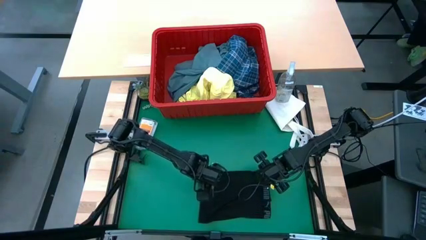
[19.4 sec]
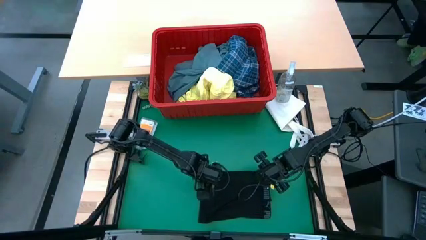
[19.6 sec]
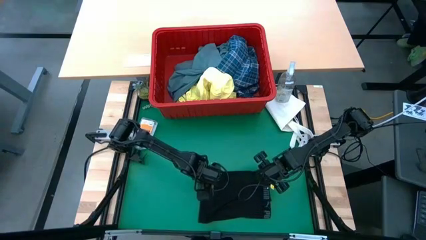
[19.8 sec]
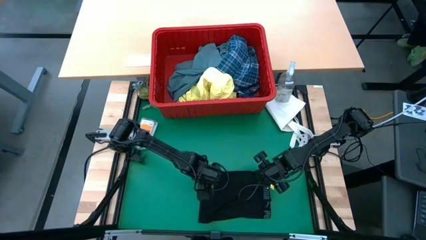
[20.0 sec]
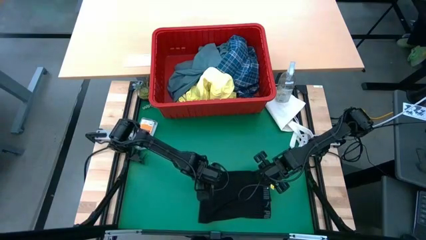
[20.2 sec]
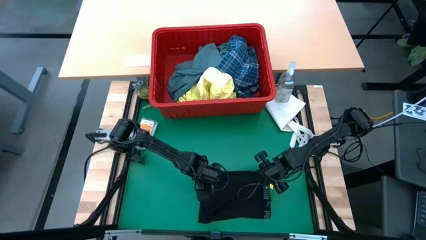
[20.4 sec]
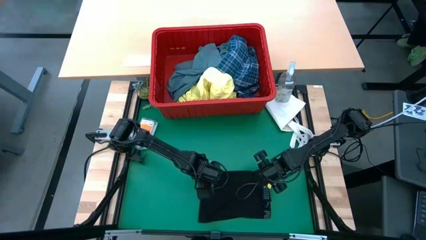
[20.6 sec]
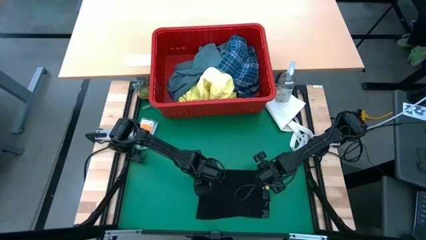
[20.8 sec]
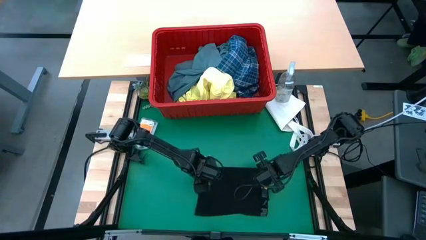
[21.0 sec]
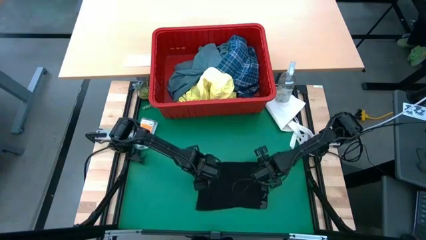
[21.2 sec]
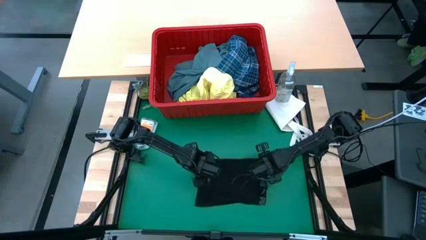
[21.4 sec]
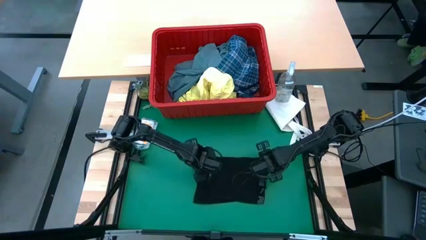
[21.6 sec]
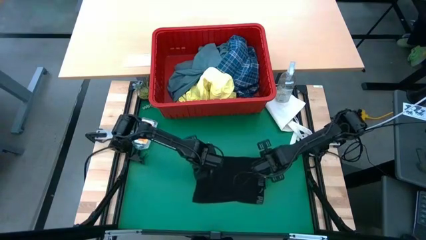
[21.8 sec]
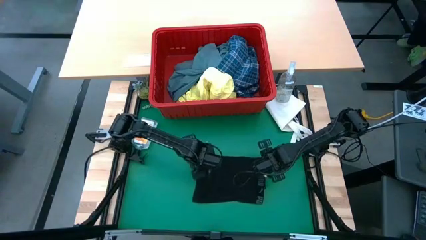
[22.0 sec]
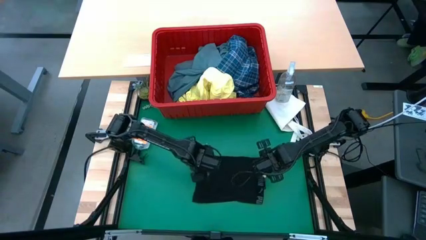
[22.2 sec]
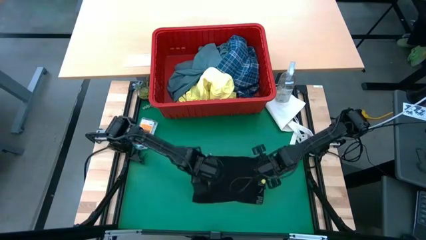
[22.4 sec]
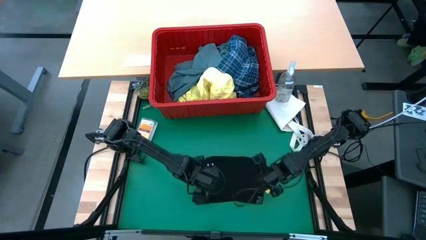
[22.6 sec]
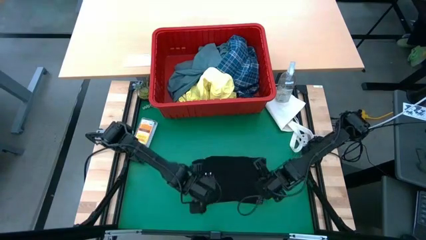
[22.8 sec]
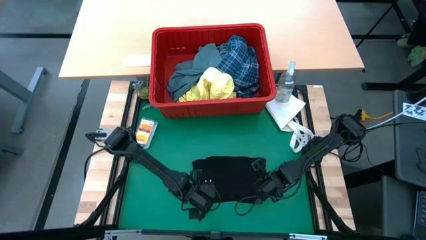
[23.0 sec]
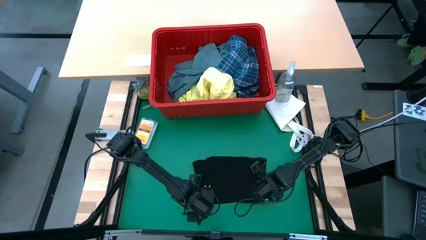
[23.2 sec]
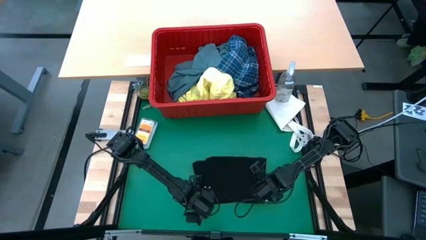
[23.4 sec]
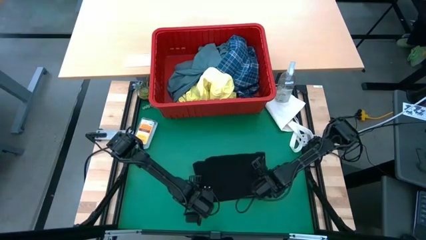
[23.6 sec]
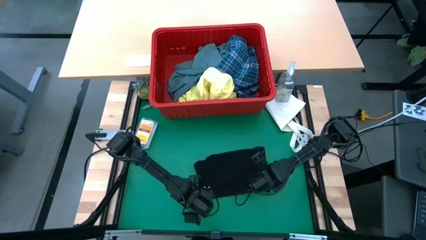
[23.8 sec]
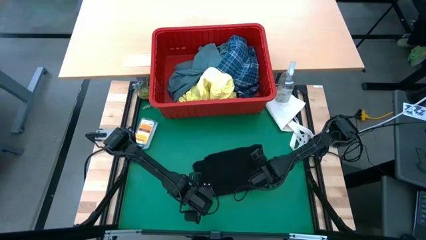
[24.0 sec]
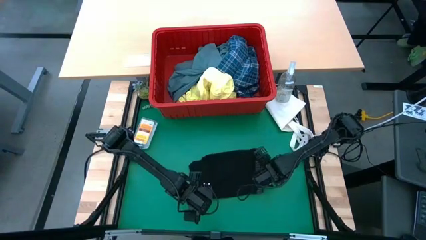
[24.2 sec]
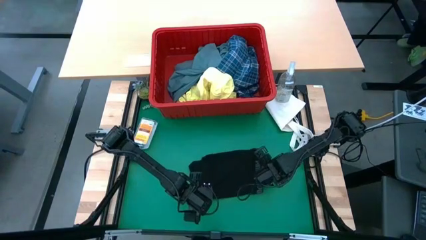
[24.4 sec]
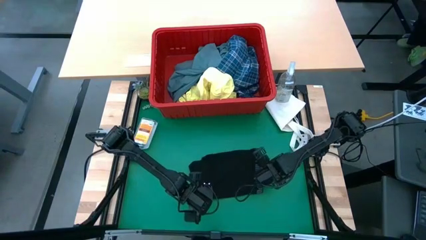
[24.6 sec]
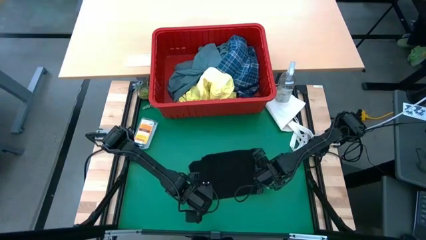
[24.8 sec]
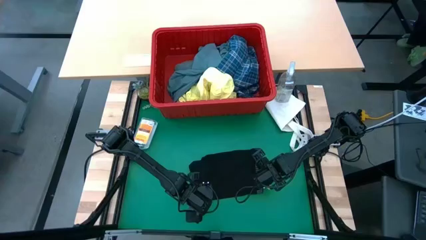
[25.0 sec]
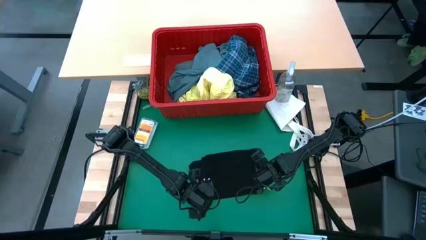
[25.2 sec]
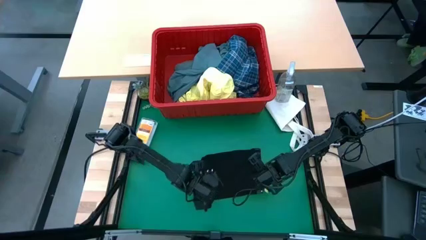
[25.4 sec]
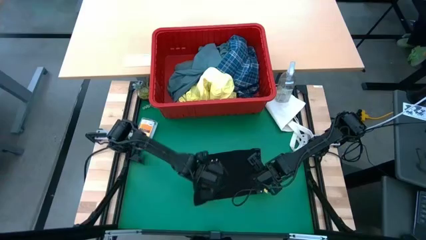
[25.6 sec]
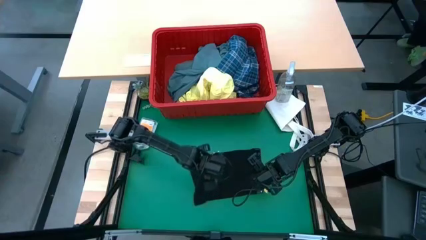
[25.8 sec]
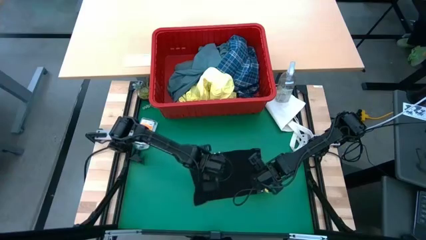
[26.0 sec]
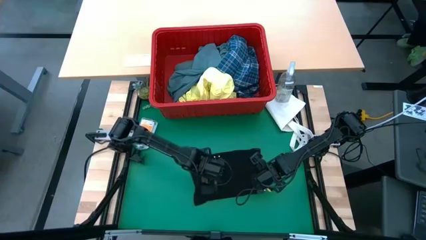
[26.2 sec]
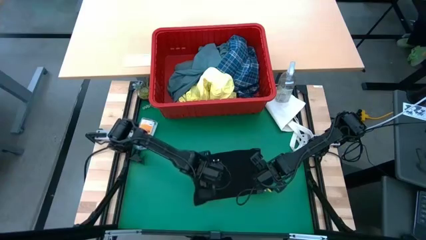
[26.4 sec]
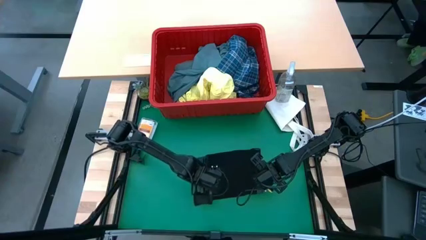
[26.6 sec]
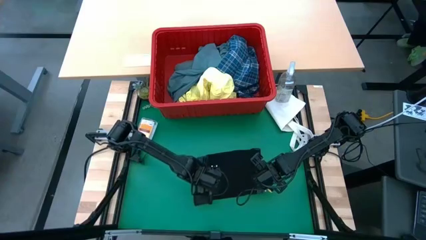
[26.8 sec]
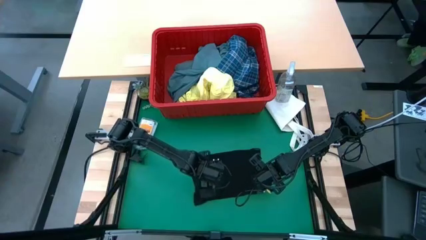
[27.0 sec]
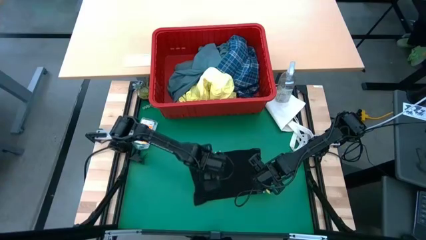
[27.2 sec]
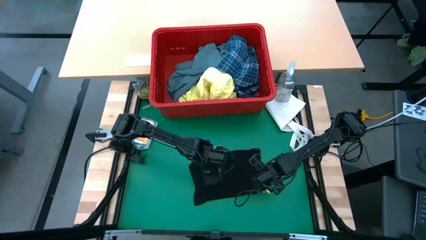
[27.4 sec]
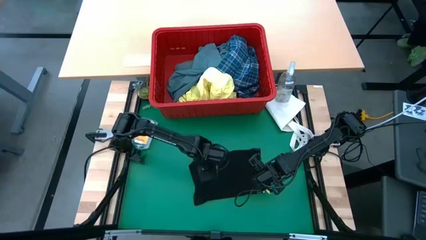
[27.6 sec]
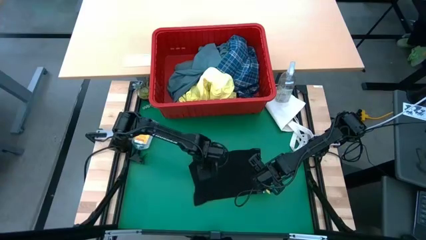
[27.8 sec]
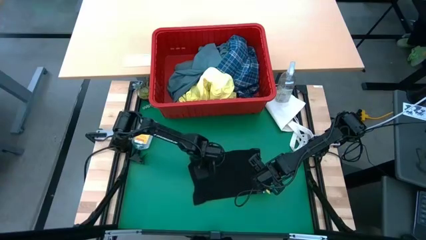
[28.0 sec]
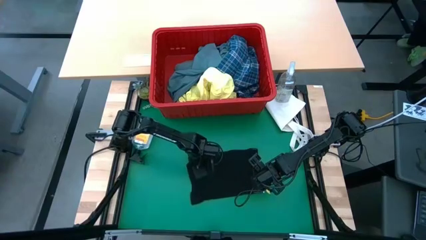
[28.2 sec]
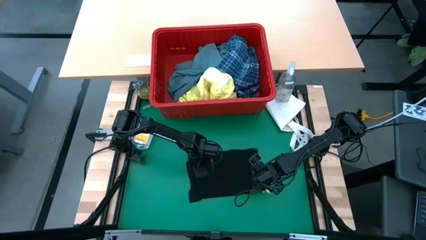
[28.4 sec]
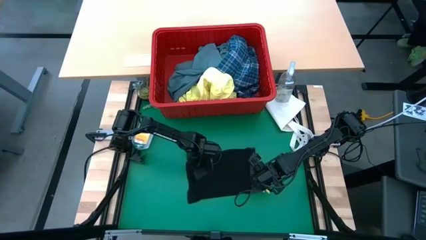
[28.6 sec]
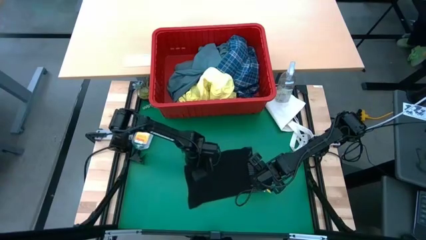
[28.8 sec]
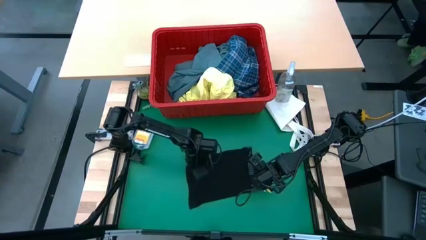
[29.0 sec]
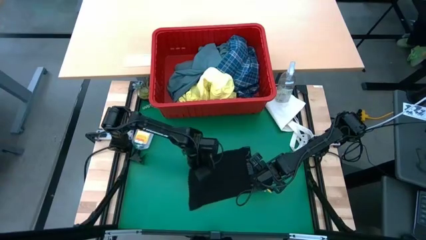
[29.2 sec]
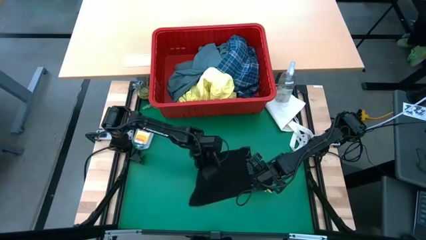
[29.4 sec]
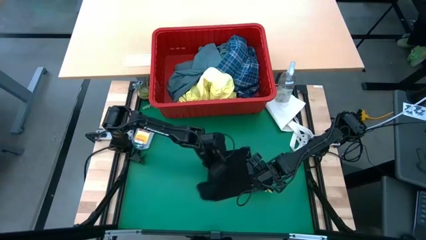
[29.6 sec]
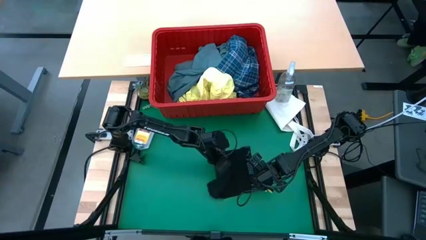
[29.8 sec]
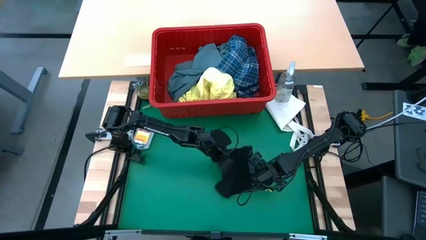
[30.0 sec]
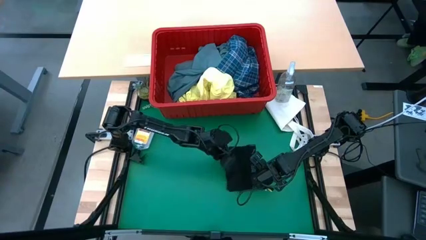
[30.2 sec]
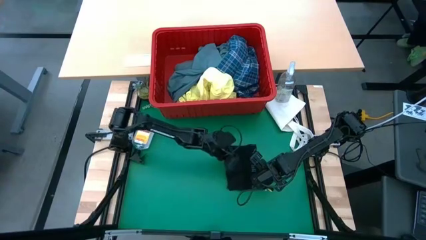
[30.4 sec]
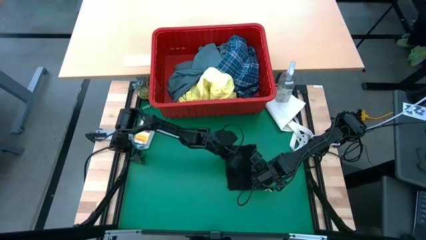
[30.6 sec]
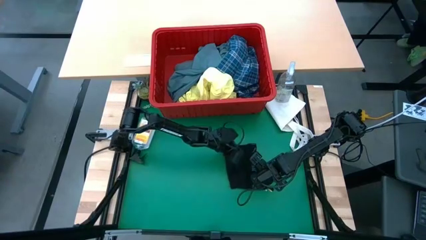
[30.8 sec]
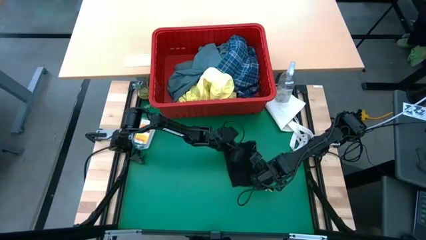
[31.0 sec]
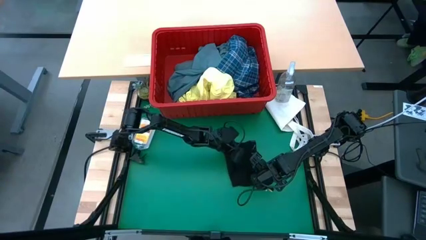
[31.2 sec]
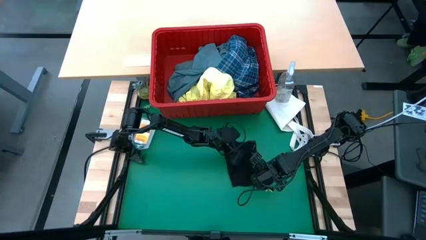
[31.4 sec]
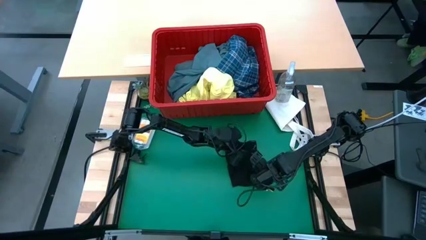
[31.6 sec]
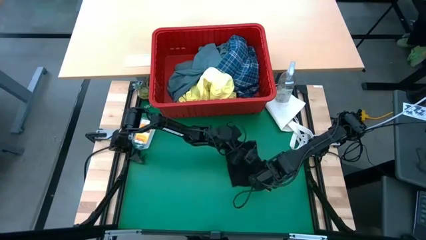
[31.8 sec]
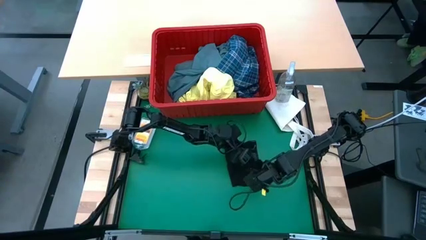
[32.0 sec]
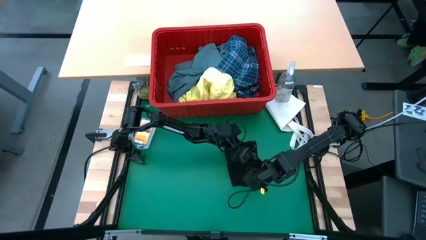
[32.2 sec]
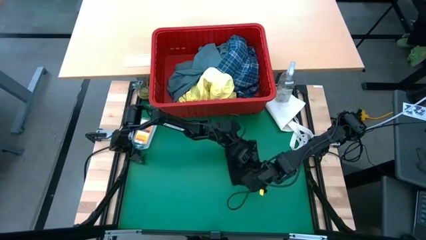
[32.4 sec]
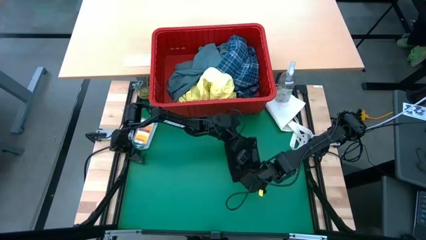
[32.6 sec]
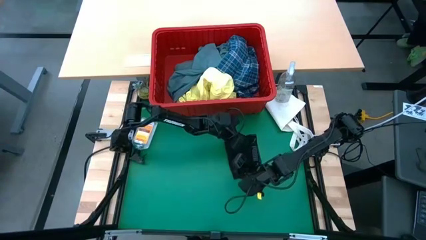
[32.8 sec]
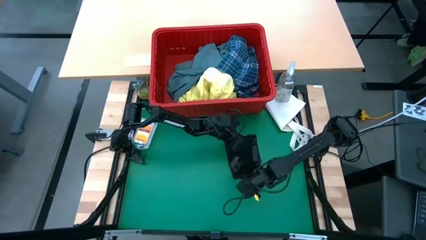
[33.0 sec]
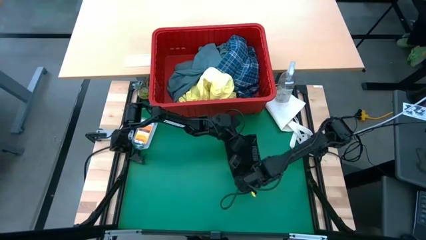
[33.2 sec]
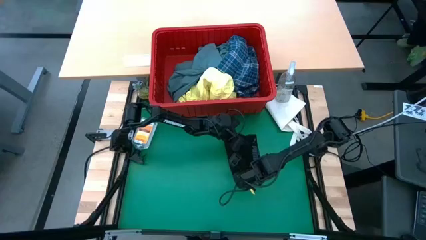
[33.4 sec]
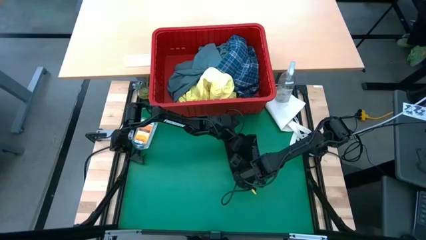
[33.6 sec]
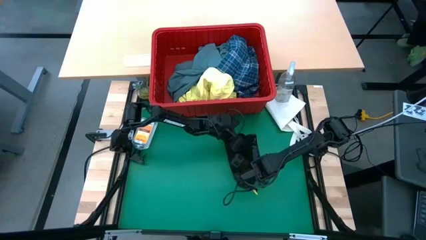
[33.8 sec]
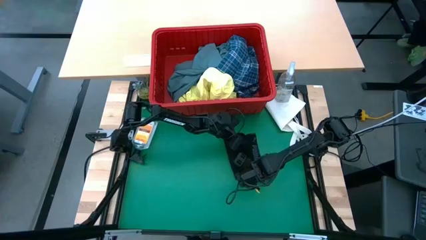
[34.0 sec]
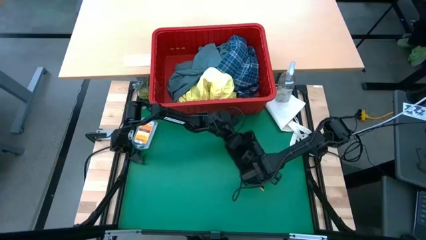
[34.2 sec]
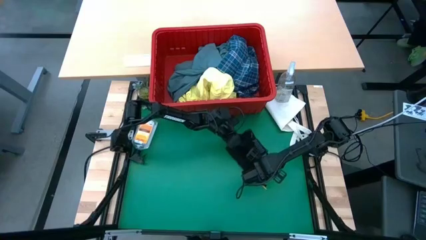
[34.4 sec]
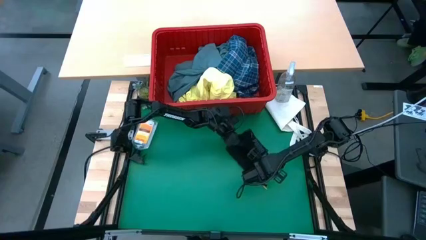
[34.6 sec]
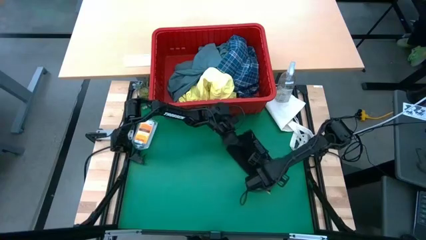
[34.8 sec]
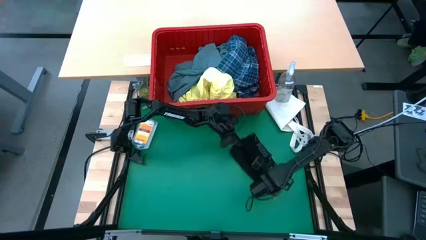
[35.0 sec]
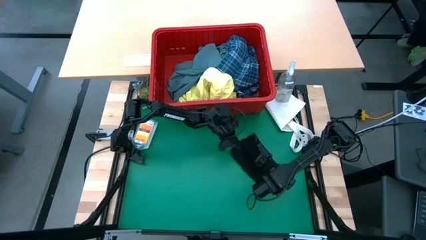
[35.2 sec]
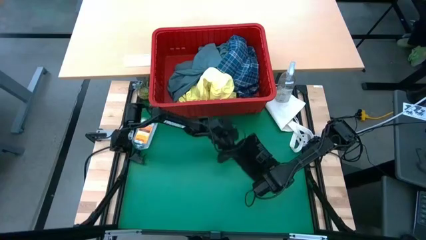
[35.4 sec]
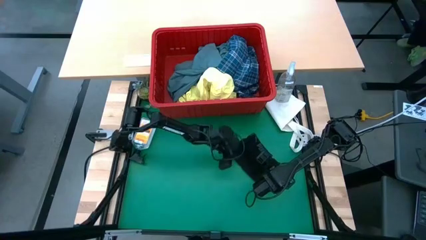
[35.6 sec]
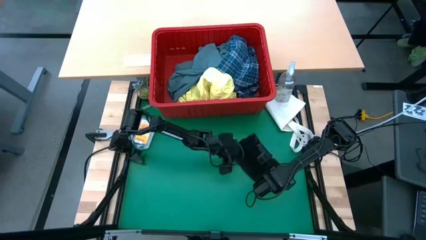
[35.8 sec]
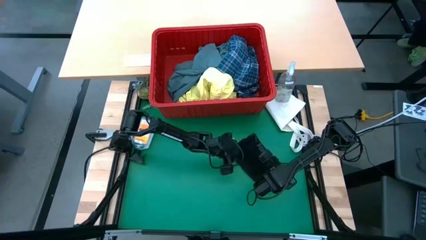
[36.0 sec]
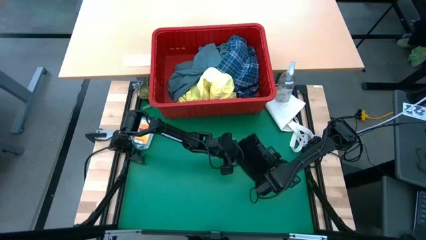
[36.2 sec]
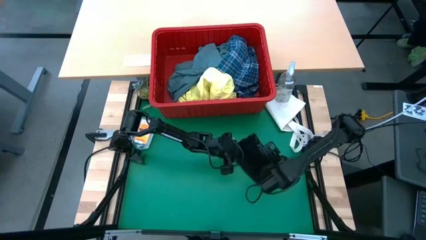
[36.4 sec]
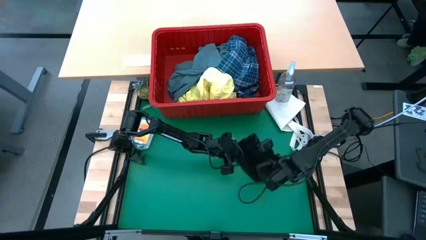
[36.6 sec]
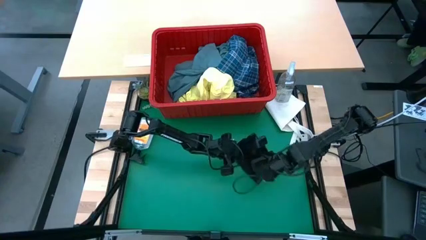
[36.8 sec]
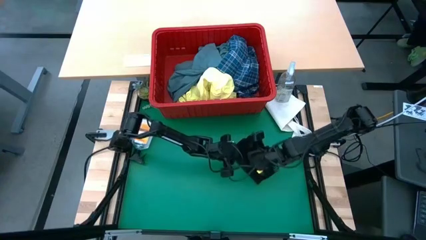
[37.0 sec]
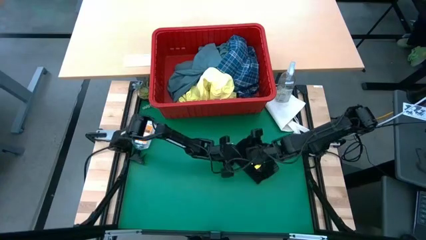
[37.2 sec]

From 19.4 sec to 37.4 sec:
Task: Fold Laundry from Bin
Fold the black underwear shorts
